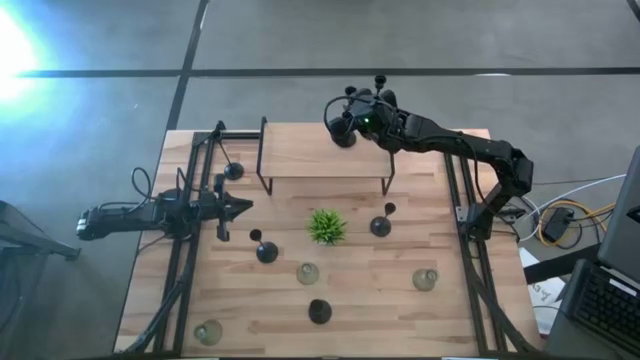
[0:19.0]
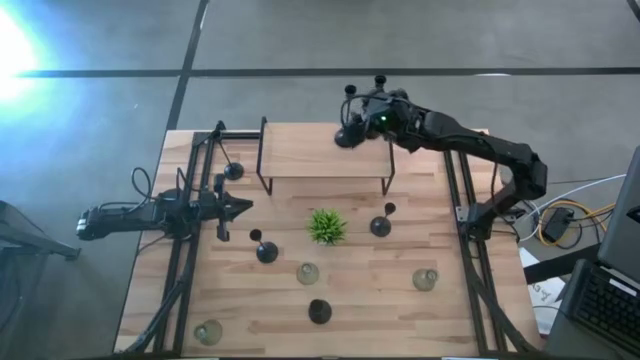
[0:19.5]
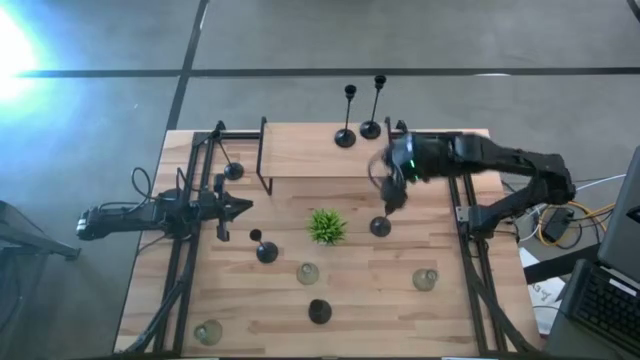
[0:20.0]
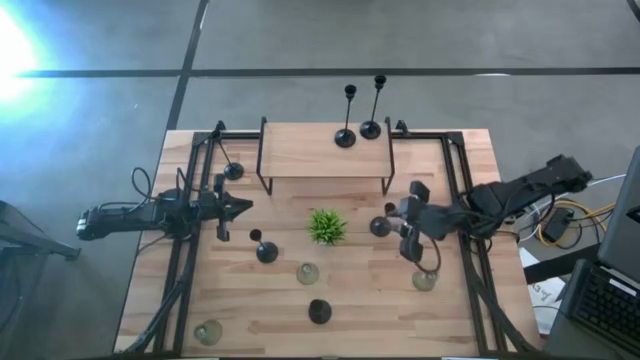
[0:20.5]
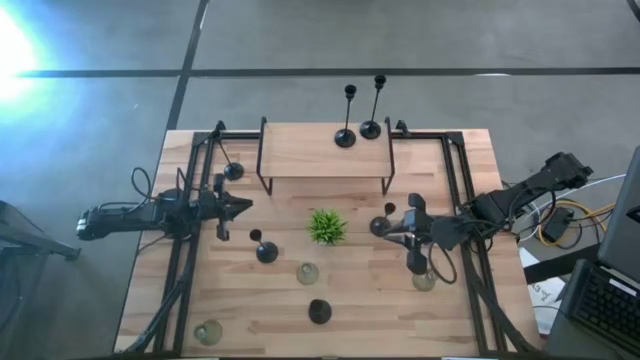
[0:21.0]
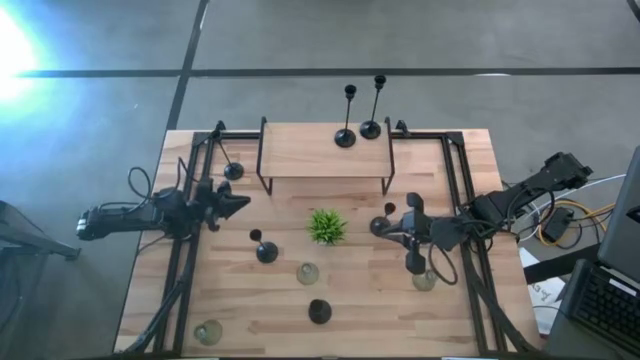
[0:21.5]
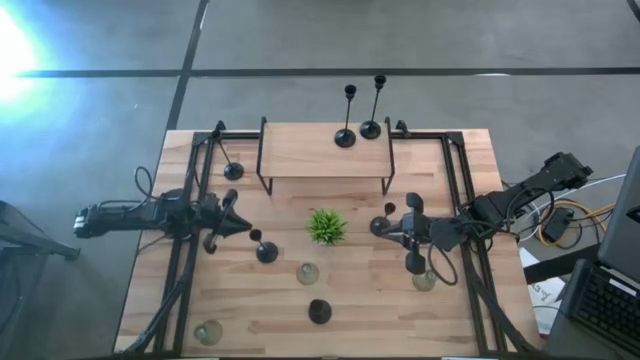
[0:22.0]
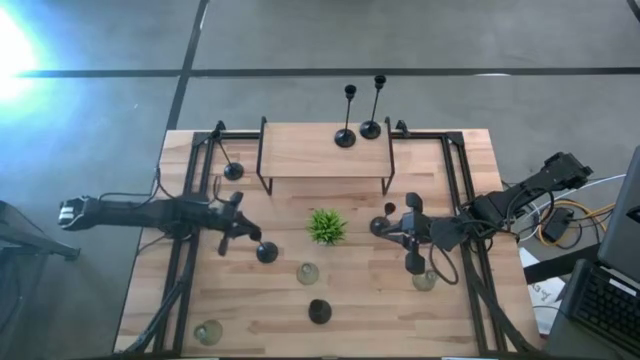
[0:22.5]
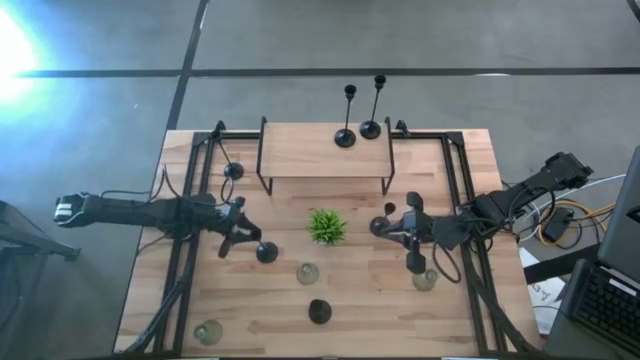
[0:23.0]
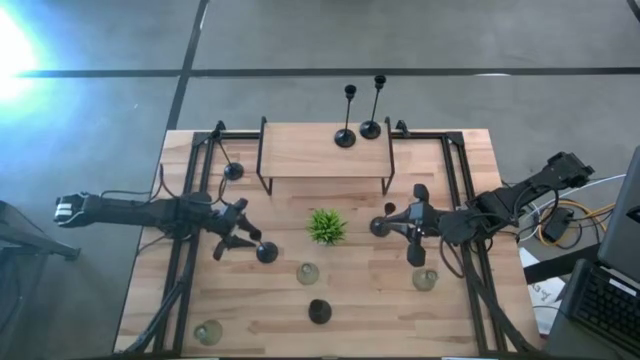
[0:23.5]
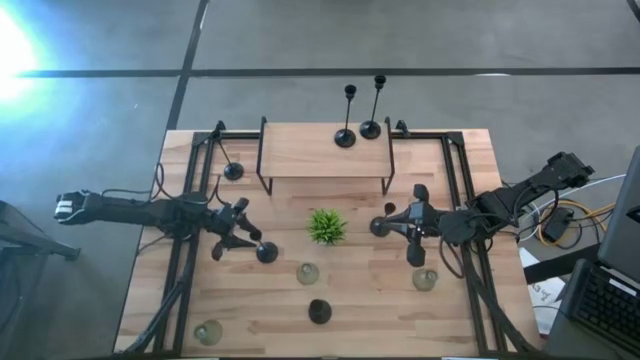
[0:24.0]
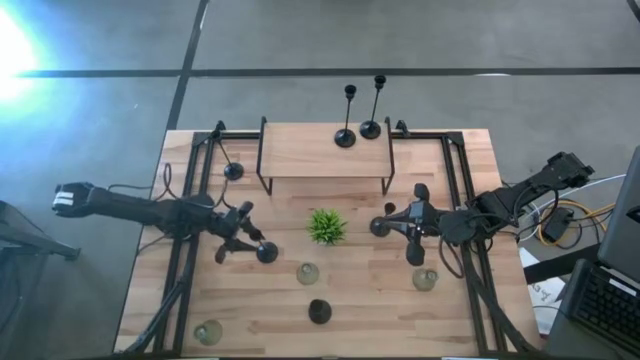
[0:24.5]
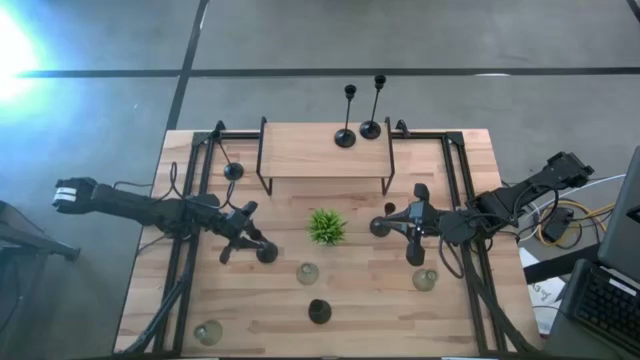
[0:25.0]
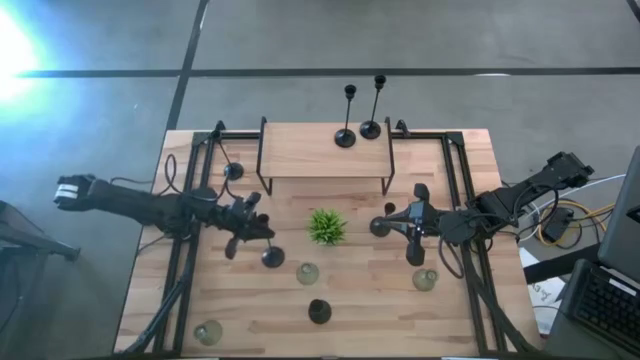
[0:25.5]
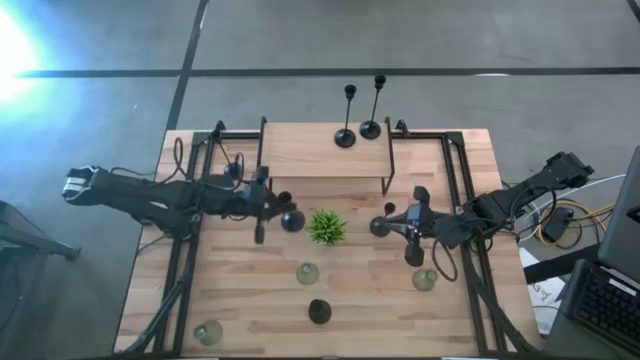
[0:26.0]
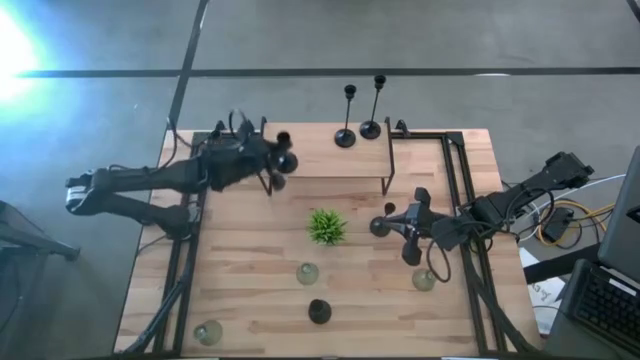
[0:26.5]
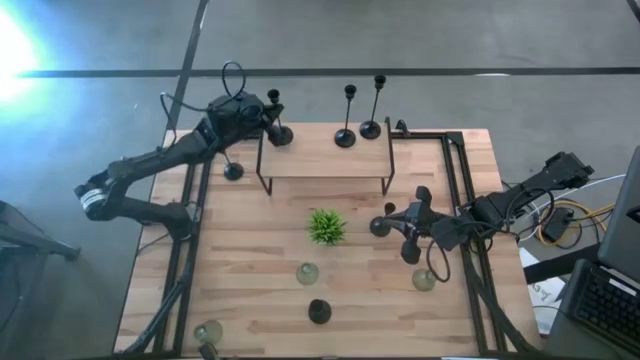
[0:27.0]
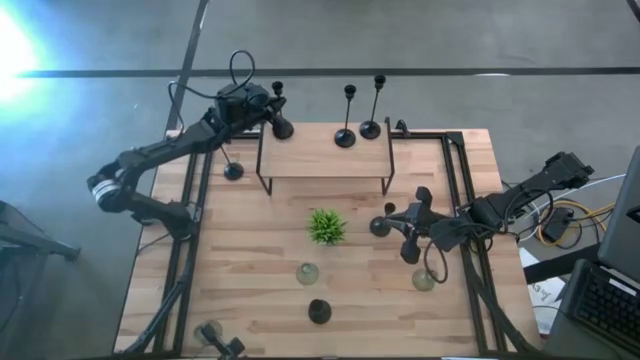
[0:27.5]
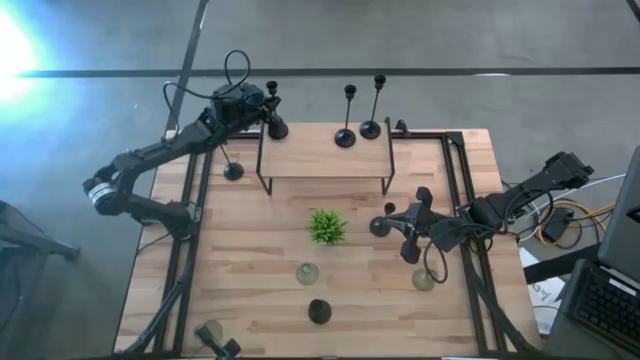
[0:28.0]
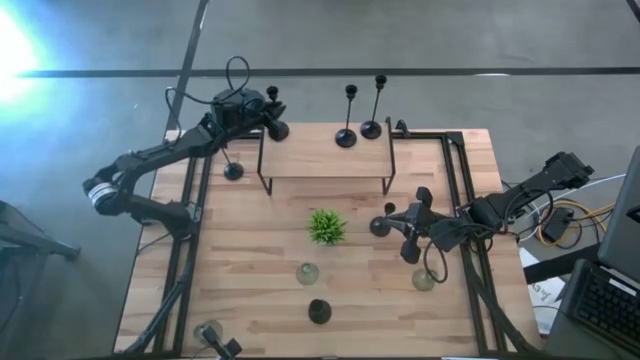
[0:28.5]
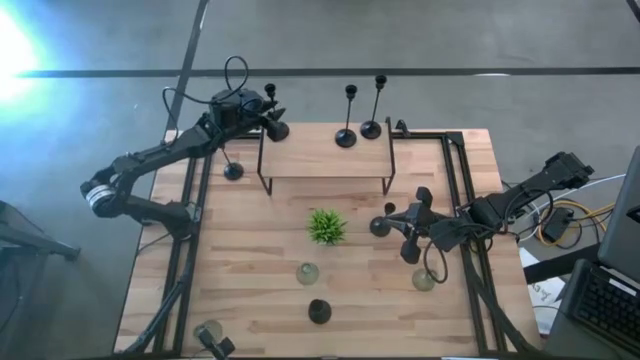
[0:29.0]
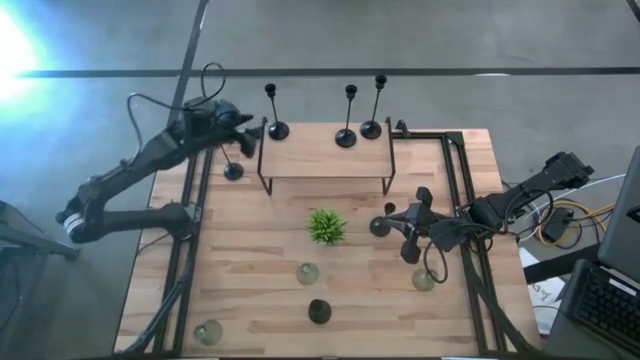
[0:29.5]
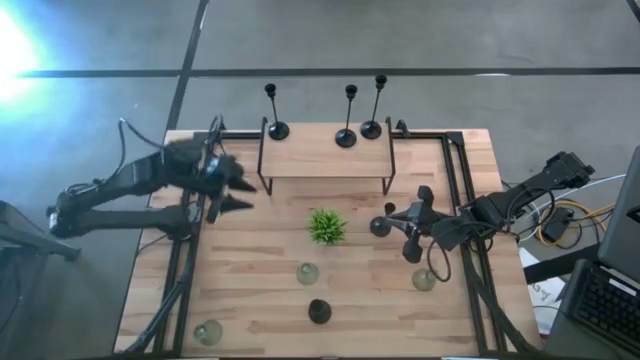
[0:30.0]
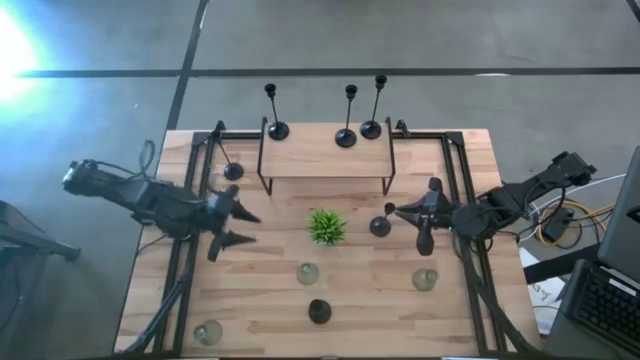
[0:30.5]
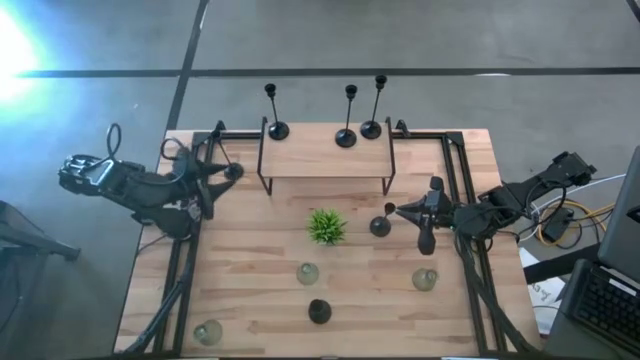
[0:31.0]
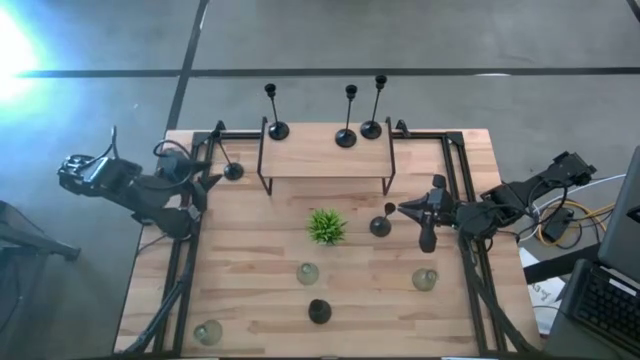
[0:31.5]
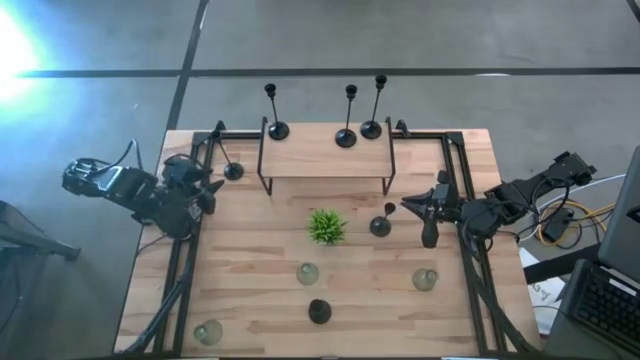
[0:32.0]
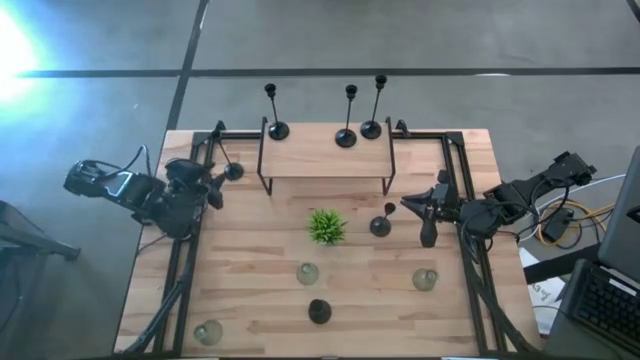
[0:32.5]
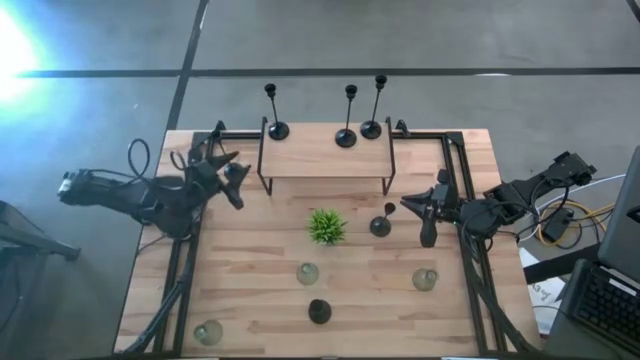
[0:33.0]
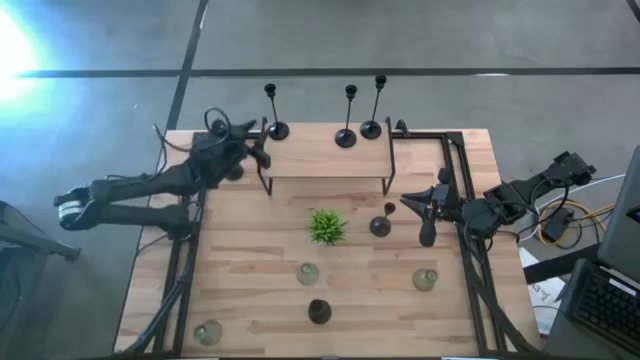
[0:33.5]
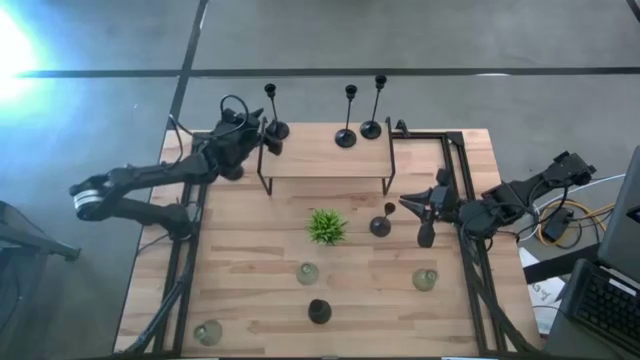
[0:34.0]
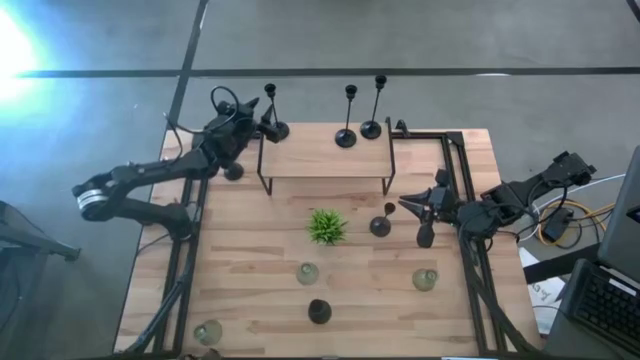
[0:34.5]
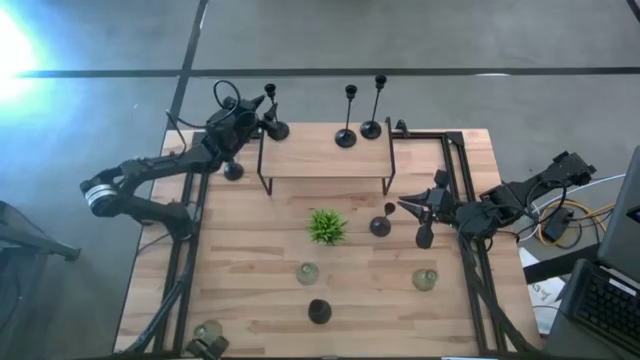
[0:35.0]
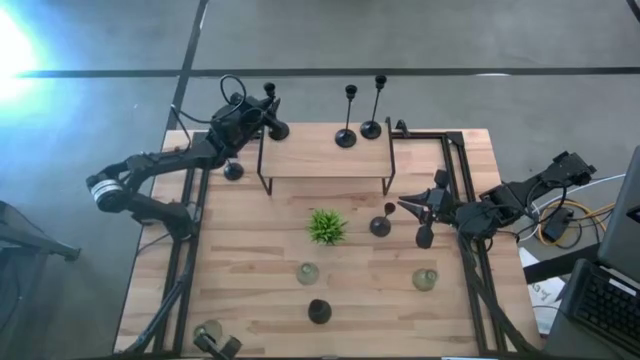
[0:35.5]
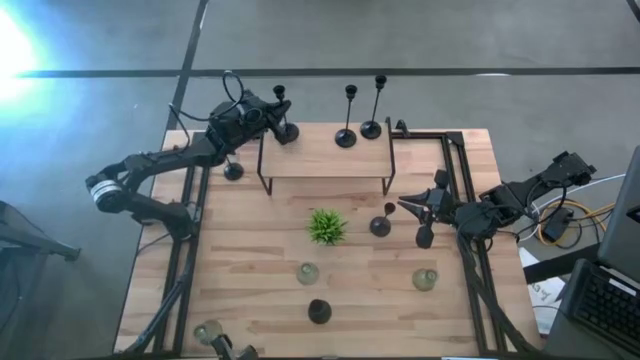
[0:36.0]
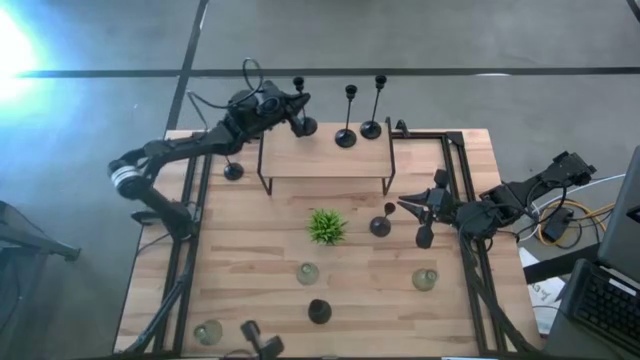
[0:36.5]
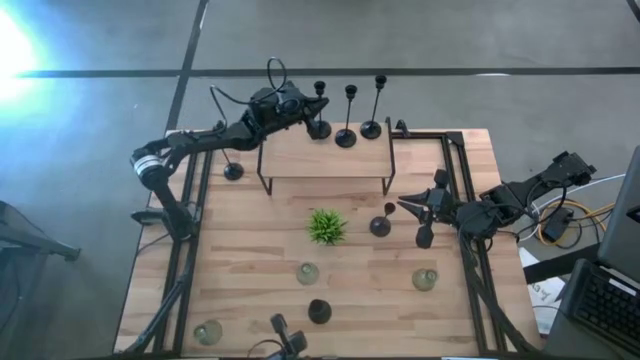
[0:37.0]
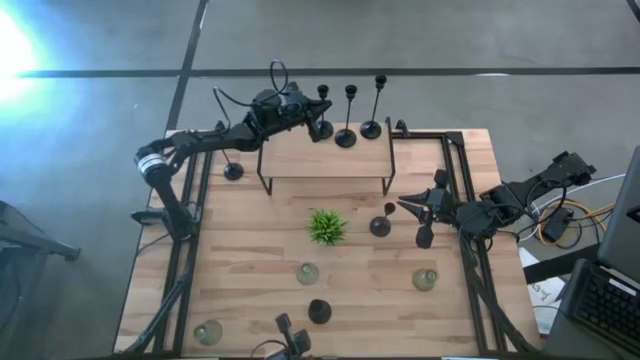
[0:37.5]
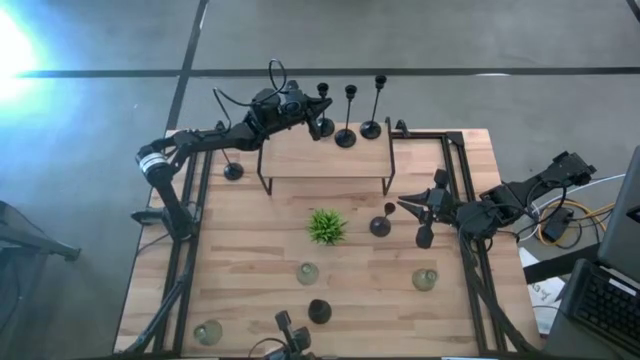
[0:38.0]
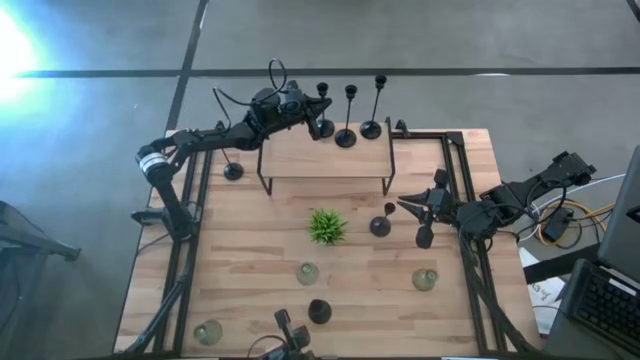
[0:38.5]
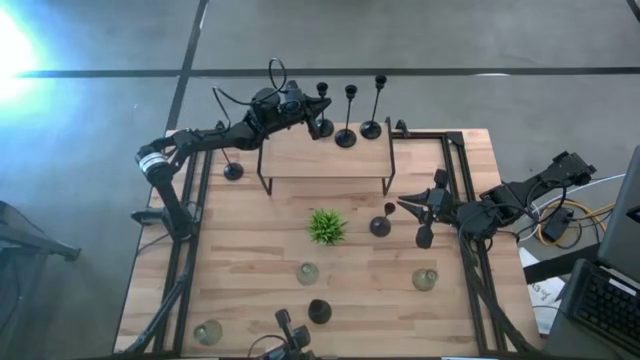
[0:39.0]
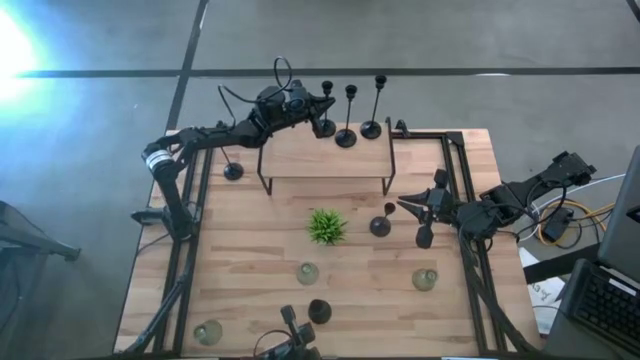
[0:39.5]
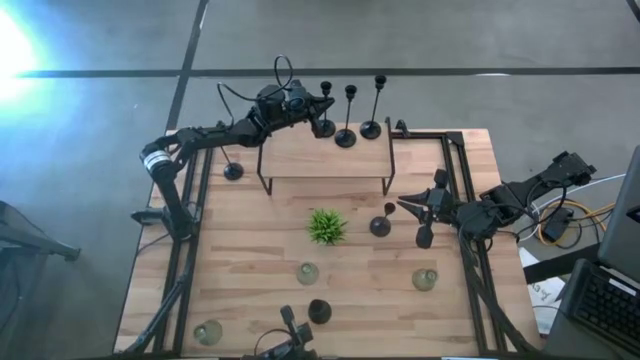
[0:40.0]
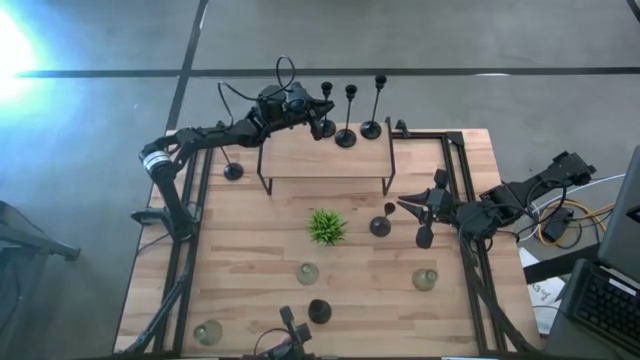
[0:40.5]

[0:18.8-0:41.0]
Task: Pick & Place candle stick holders
Put the small black candle holder on the shelf
